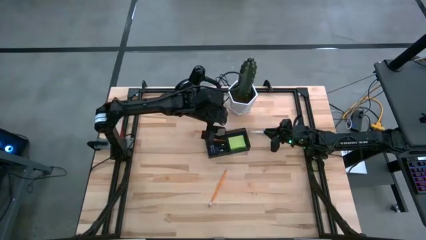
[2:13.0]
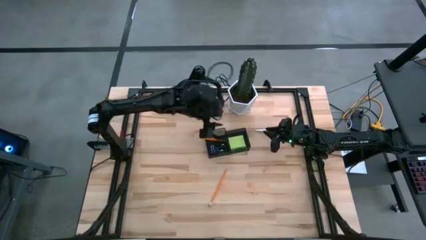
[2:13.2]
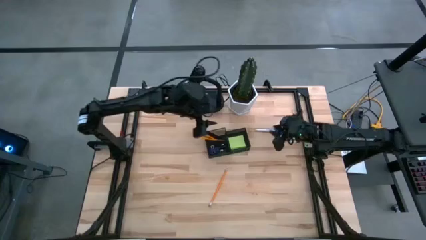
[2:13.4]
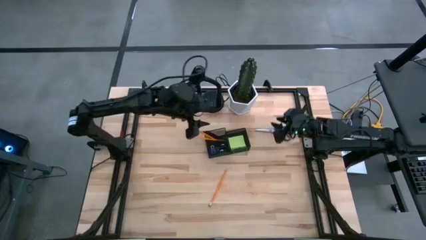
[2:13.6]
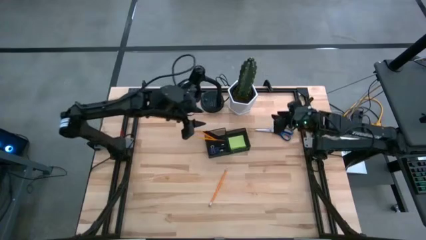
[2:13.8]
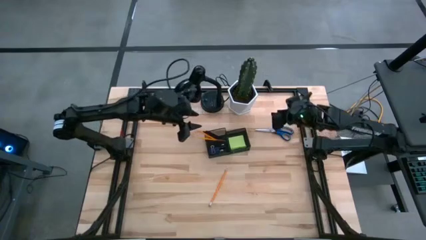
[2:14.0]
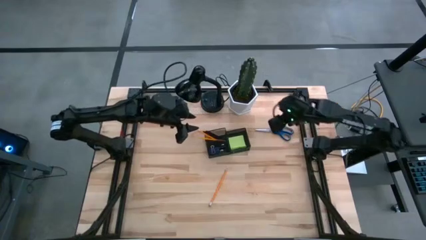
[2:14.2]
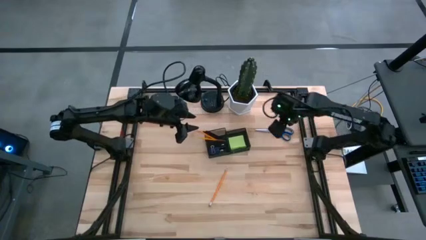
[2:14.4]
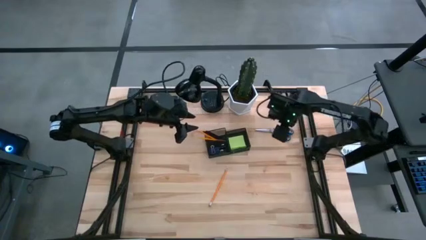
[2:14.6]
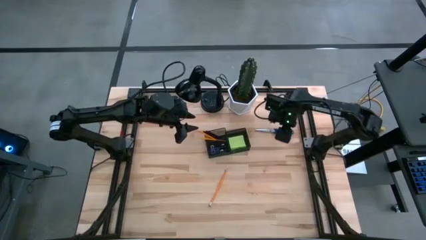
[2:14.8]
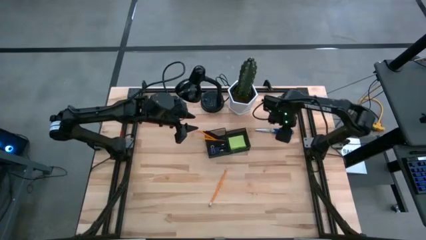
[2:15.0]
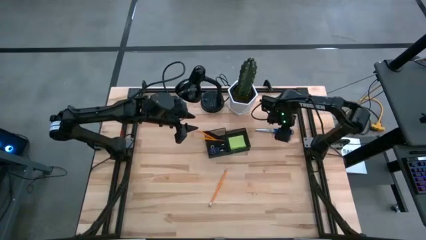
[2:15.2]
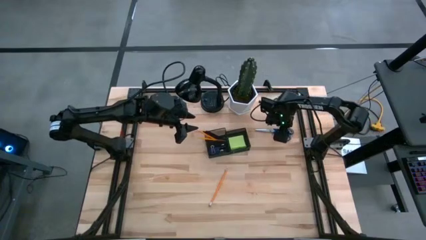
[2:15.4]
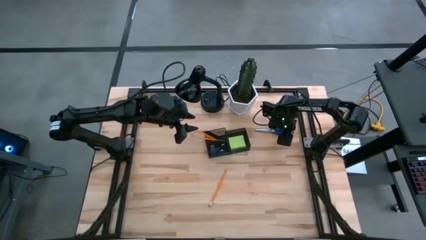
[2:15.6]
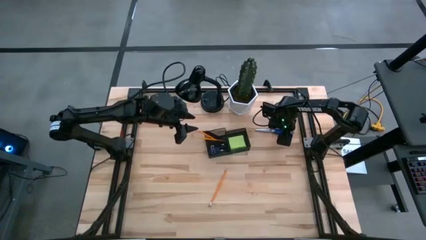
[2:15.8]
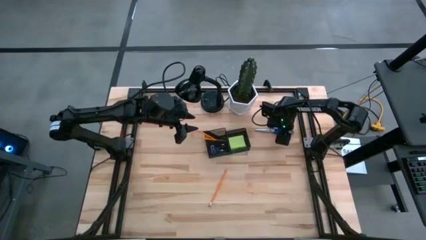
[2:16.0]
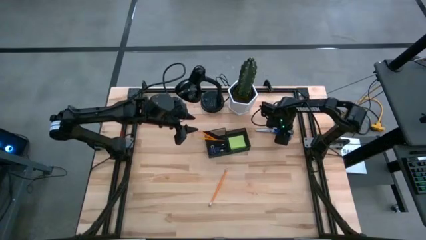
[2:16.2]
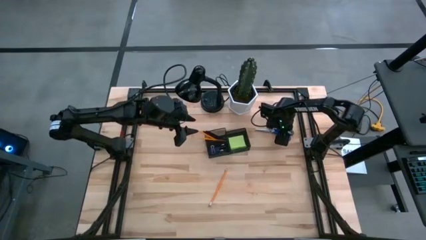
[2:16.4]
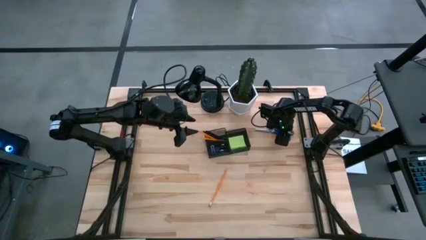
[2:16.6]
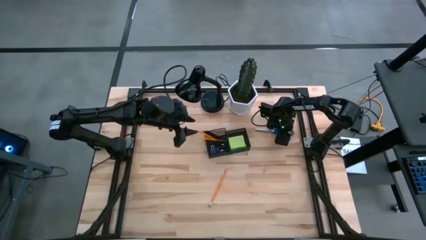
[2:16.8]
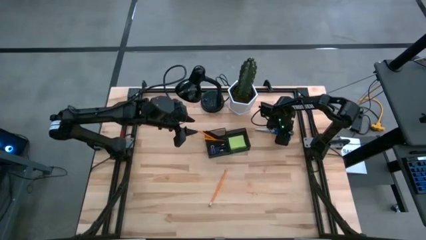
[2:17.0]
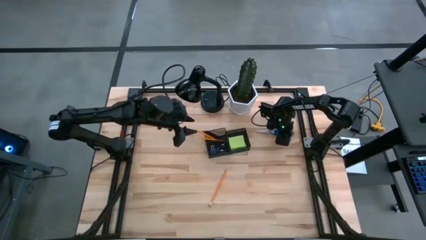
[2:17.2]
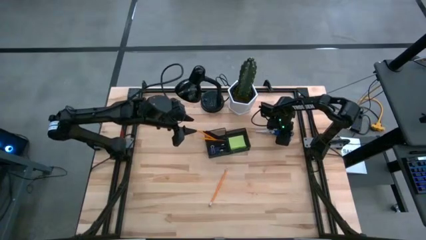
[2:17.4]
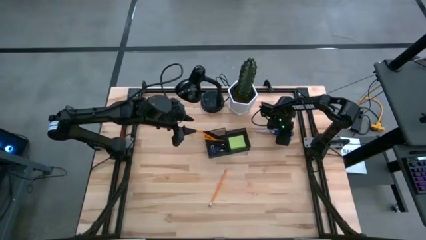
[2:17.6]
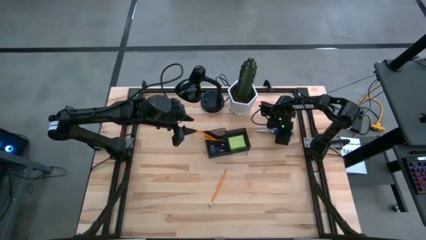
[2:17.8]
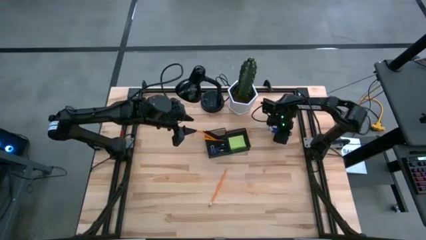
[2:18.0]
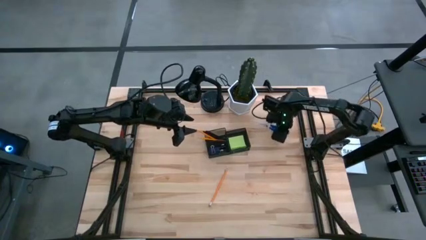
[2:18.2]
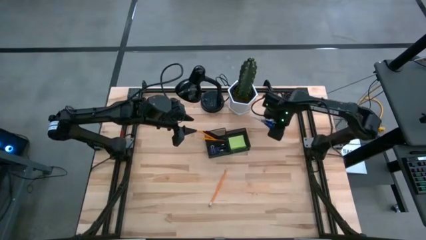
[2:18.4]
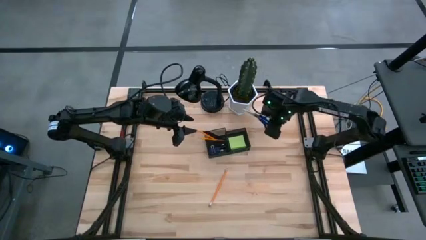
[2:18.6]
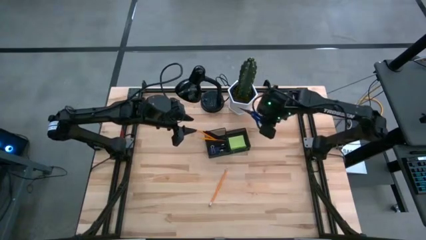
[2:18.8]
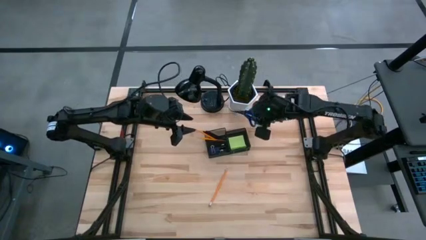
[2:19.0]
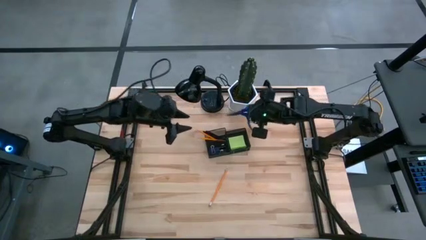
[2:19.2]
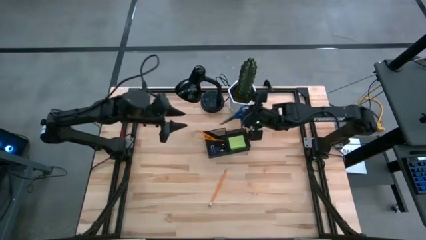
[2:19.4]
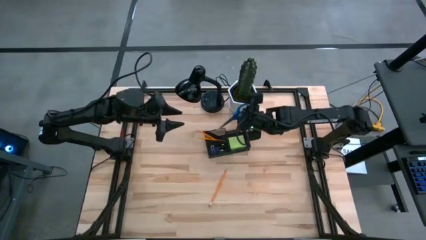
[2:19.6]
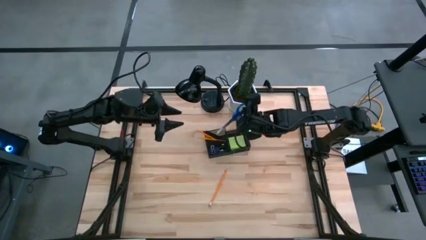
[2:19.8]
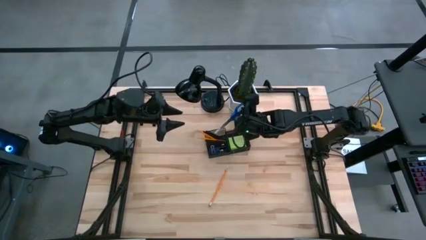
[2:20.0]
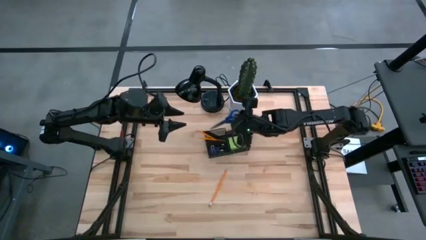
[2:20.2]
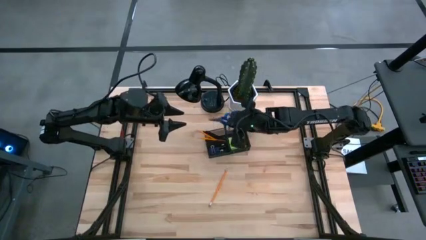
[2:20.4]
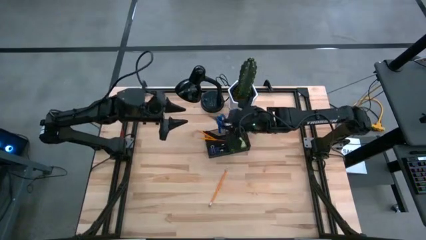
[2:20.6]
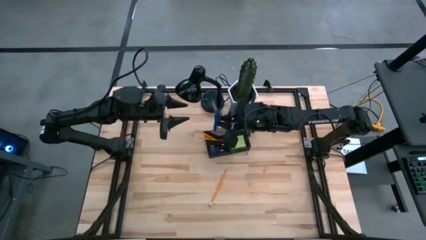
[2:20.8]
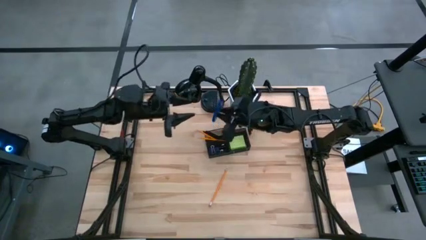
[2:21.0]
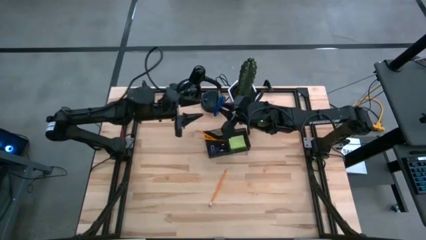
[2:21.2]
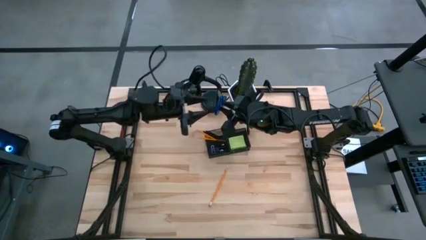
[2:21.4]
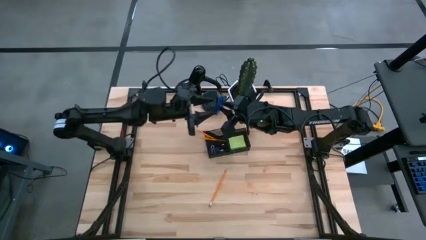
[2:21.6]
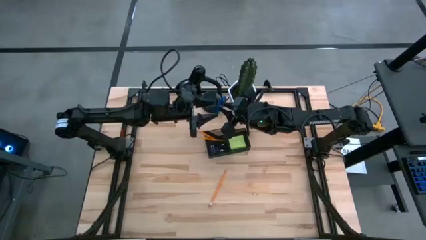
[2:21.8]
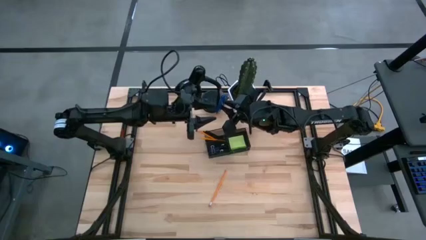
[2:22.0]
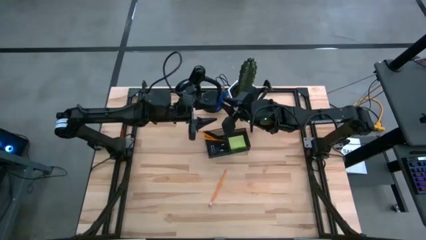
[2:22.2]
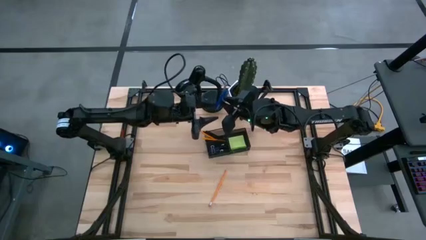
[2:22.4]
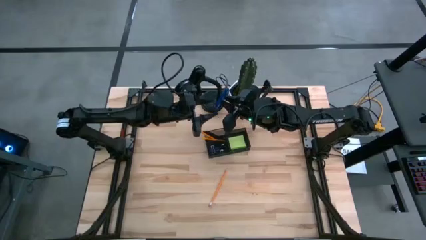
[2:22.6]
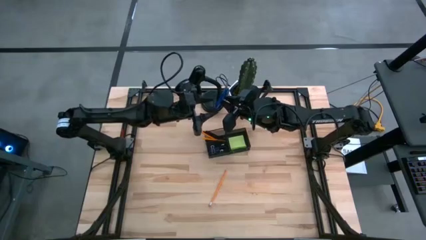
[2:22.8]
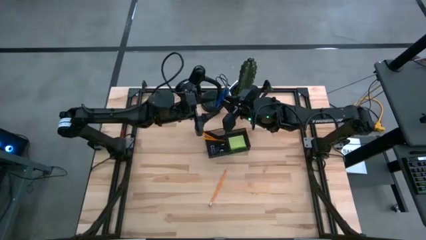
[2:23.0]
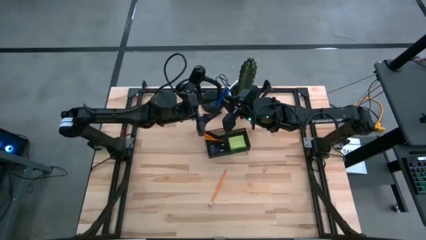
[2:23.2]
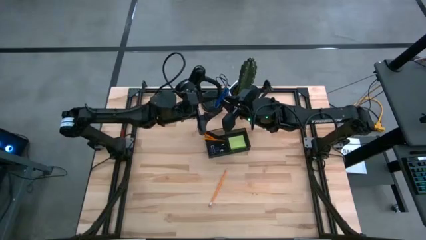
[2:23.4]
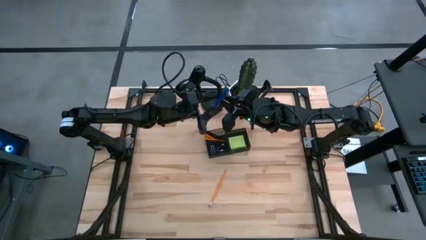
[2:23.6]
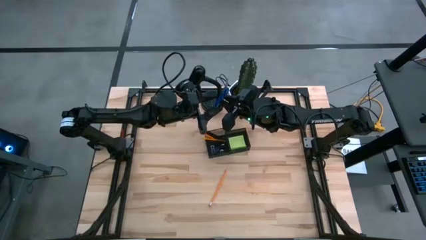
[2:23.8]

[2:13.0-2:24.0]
Task: Pick and place office supplies into organizer
Put the blue scissors into the desk organizer
